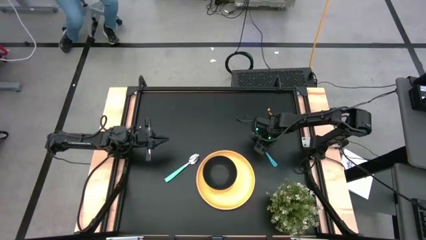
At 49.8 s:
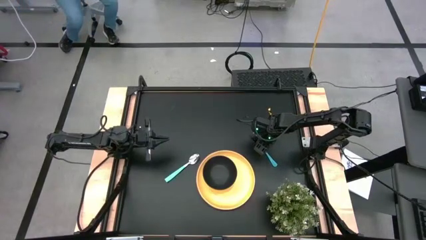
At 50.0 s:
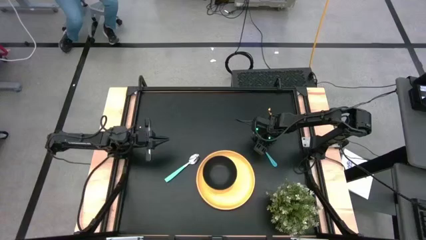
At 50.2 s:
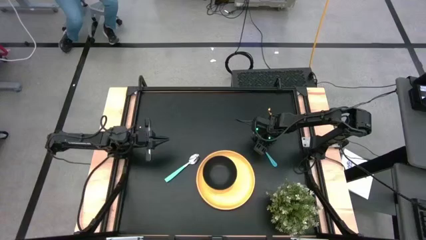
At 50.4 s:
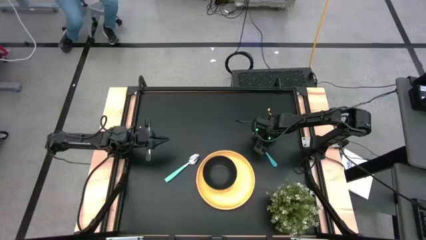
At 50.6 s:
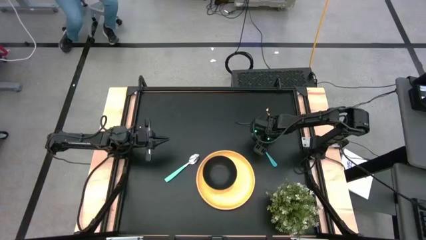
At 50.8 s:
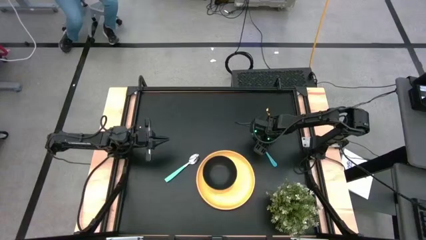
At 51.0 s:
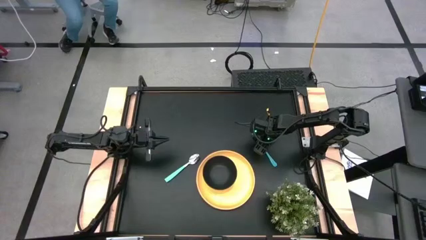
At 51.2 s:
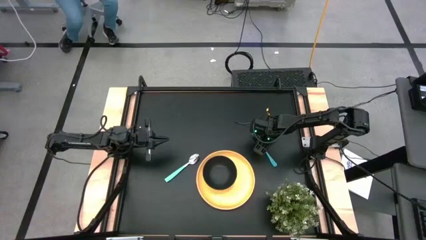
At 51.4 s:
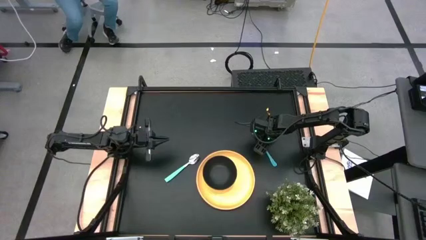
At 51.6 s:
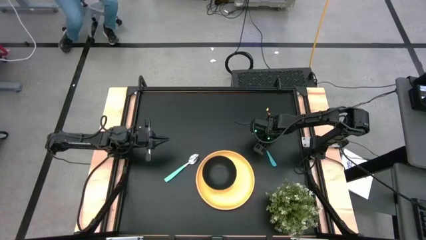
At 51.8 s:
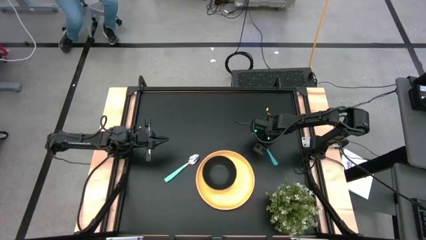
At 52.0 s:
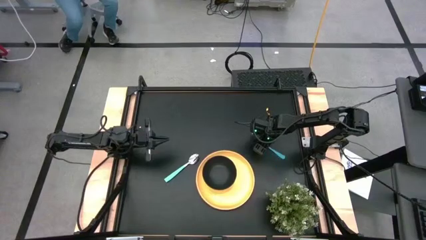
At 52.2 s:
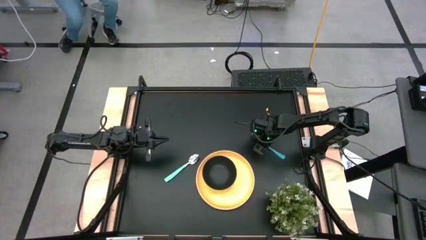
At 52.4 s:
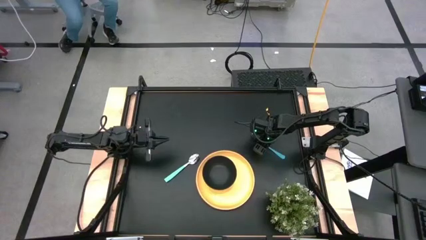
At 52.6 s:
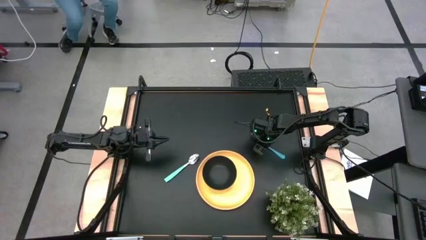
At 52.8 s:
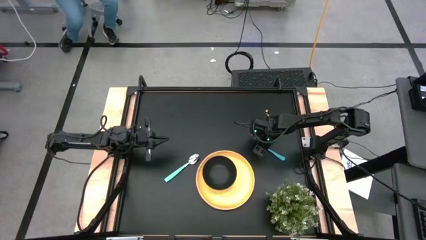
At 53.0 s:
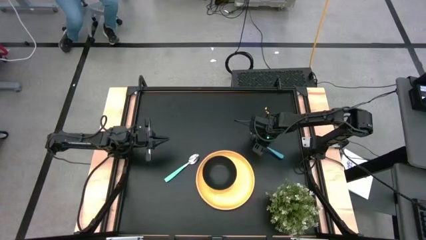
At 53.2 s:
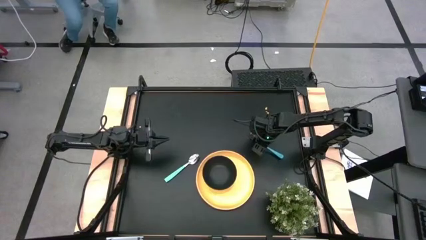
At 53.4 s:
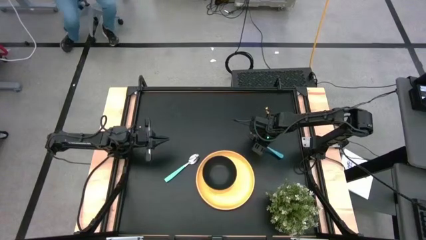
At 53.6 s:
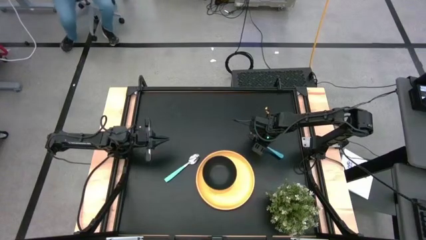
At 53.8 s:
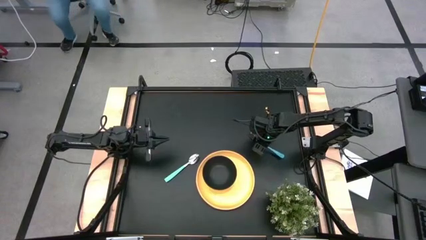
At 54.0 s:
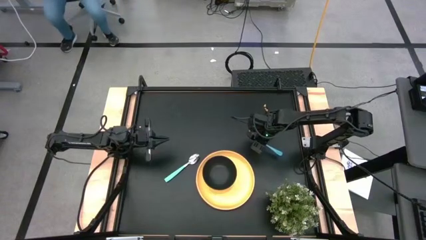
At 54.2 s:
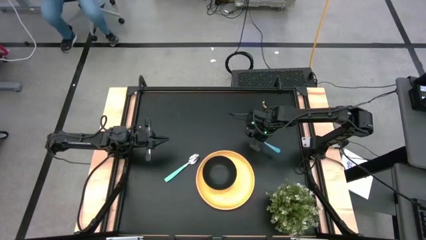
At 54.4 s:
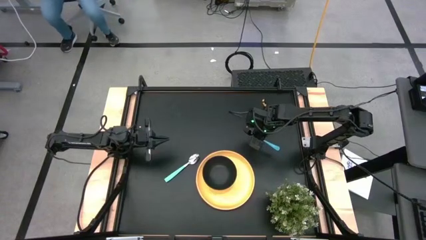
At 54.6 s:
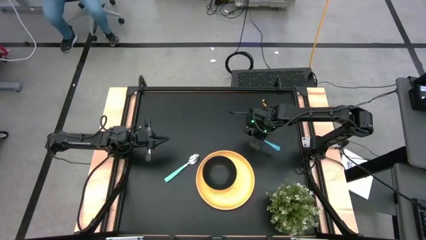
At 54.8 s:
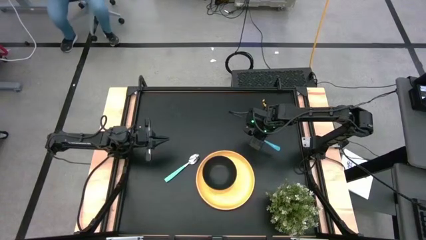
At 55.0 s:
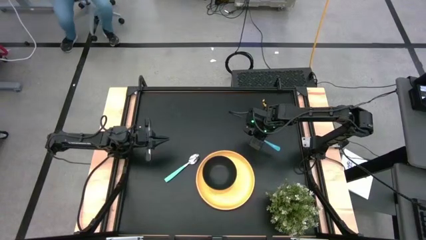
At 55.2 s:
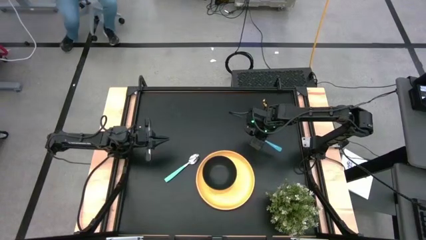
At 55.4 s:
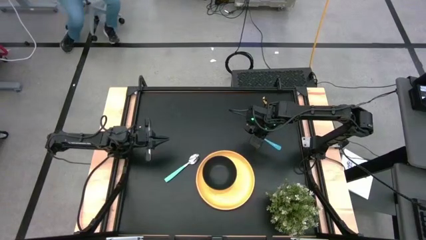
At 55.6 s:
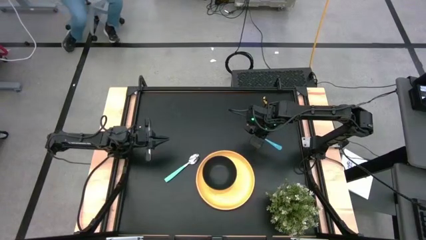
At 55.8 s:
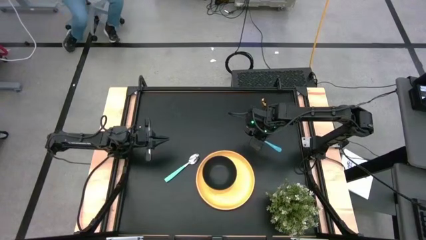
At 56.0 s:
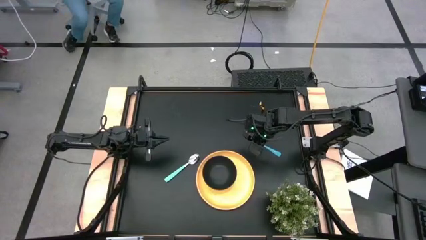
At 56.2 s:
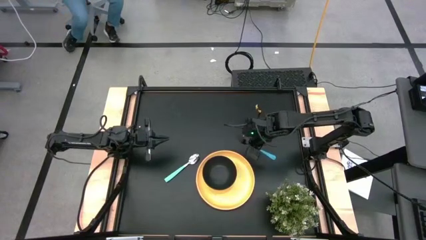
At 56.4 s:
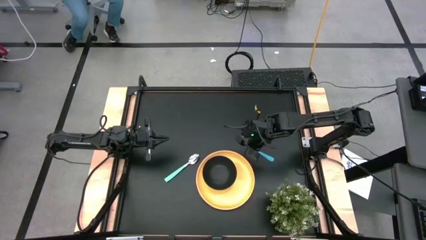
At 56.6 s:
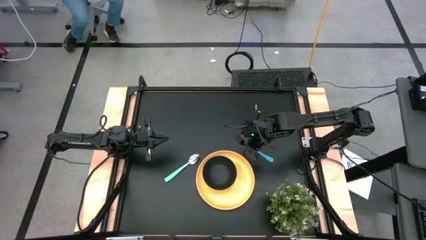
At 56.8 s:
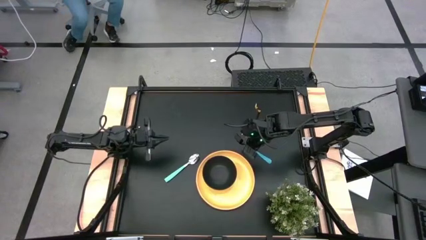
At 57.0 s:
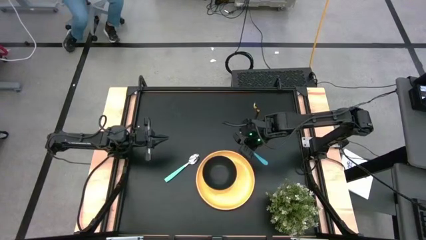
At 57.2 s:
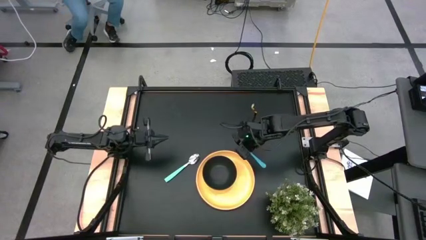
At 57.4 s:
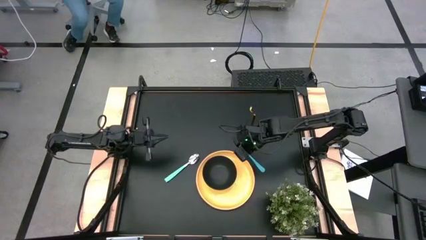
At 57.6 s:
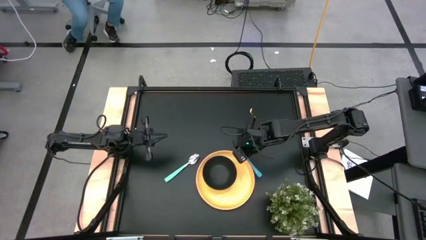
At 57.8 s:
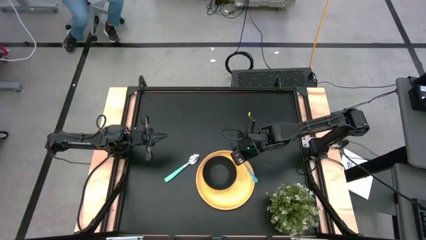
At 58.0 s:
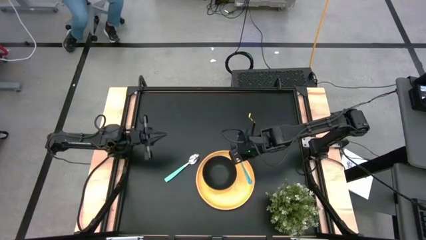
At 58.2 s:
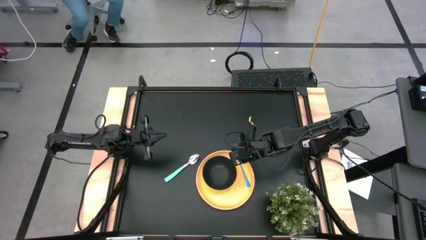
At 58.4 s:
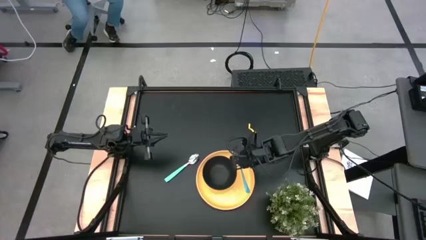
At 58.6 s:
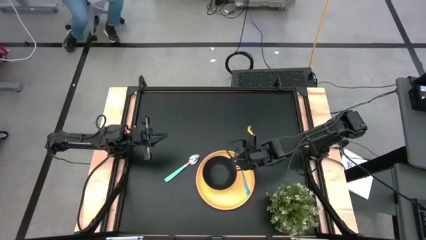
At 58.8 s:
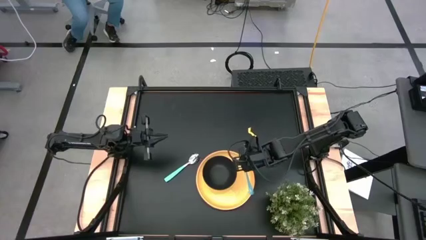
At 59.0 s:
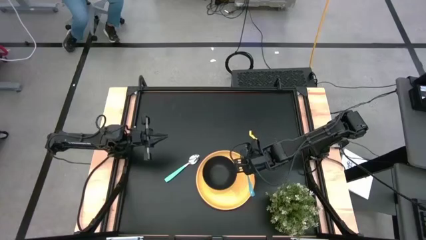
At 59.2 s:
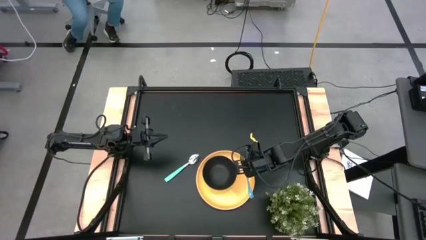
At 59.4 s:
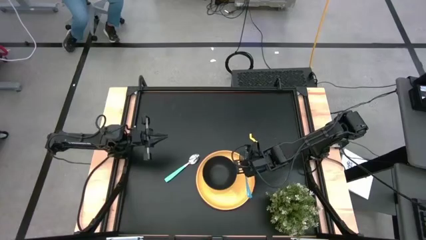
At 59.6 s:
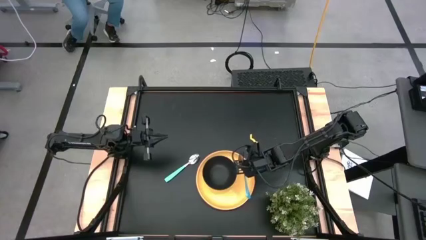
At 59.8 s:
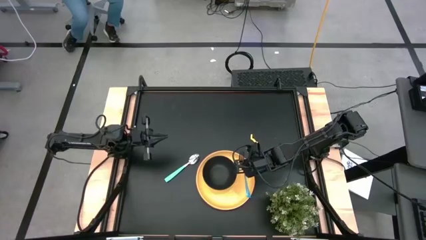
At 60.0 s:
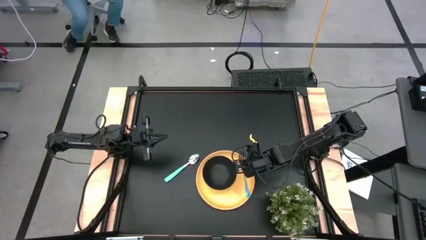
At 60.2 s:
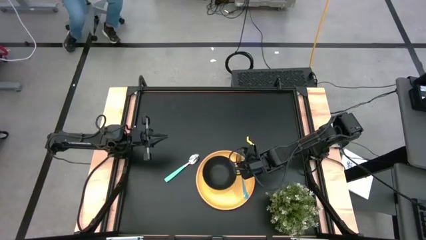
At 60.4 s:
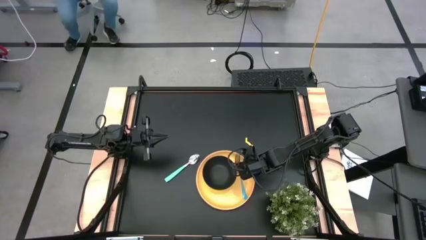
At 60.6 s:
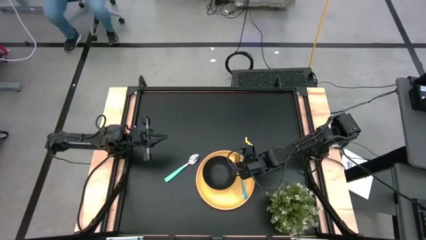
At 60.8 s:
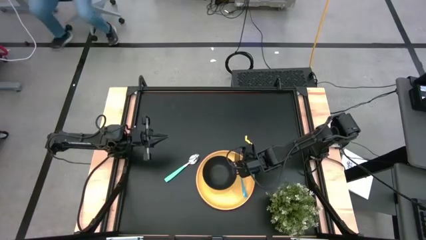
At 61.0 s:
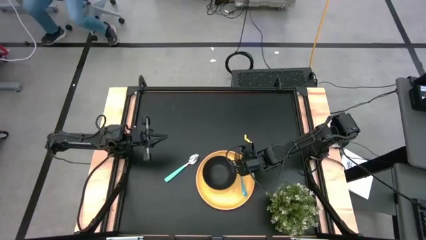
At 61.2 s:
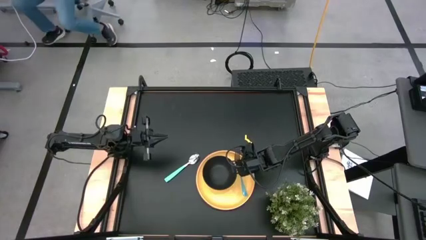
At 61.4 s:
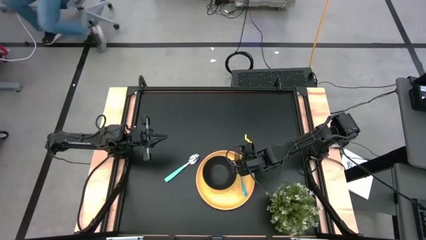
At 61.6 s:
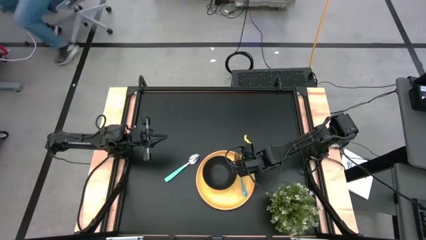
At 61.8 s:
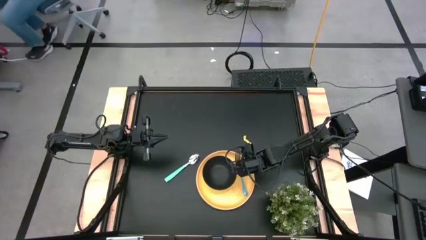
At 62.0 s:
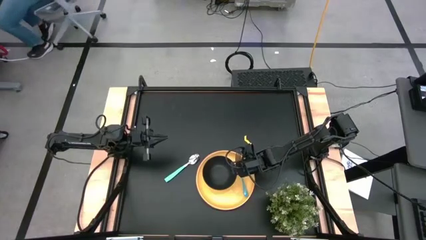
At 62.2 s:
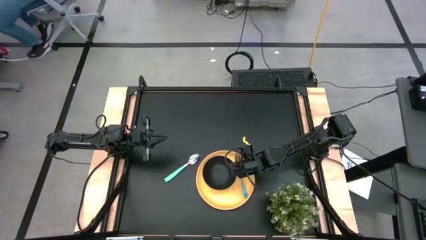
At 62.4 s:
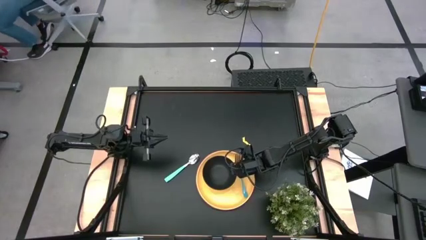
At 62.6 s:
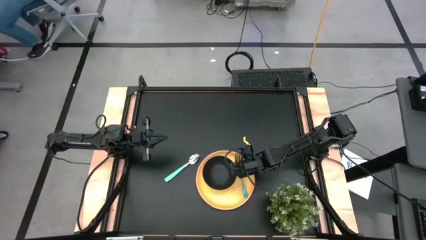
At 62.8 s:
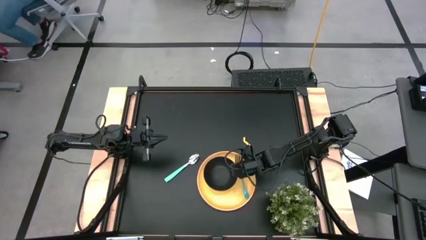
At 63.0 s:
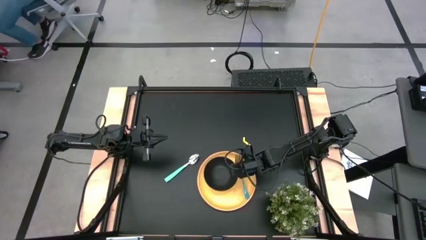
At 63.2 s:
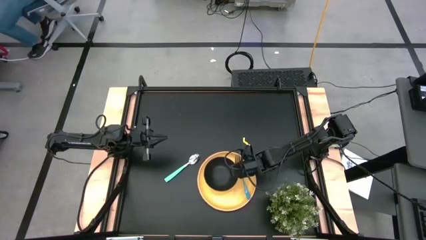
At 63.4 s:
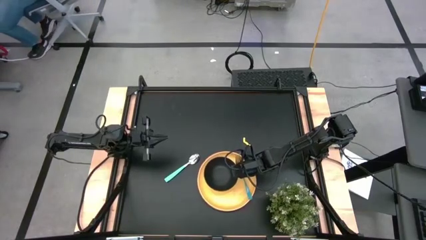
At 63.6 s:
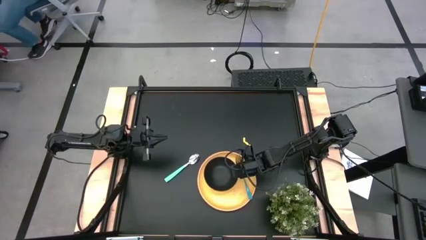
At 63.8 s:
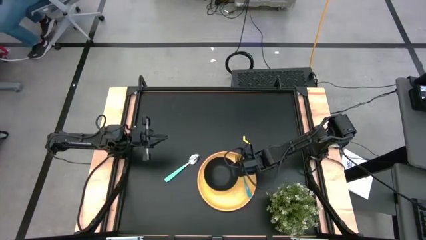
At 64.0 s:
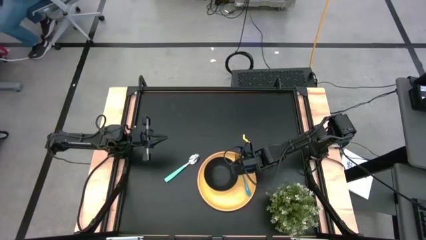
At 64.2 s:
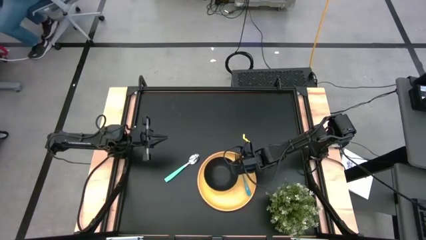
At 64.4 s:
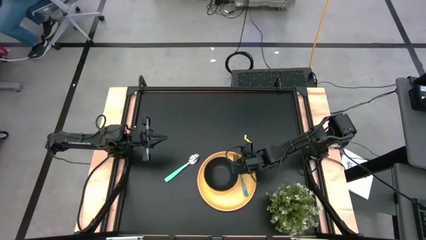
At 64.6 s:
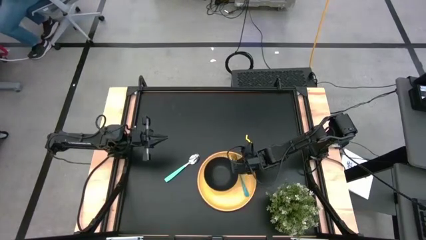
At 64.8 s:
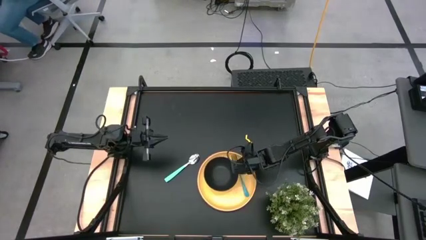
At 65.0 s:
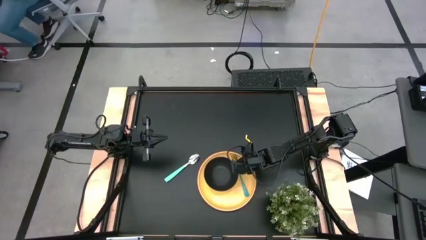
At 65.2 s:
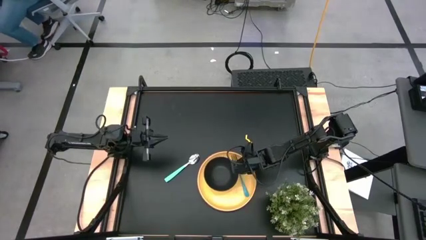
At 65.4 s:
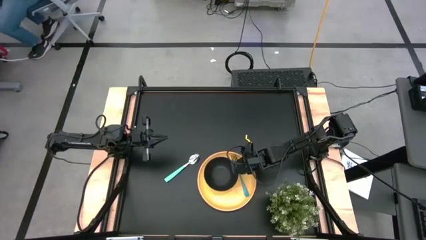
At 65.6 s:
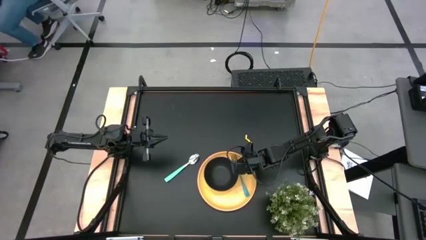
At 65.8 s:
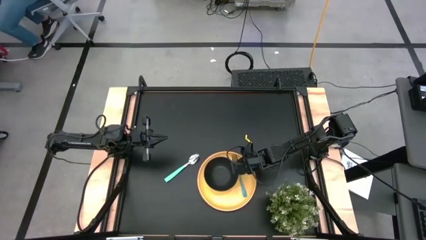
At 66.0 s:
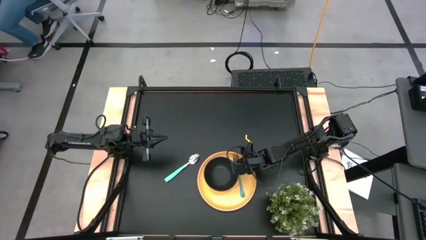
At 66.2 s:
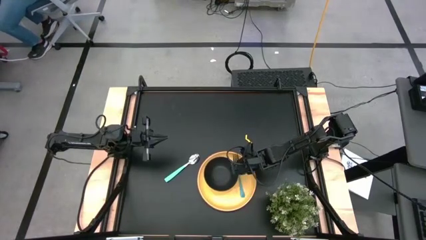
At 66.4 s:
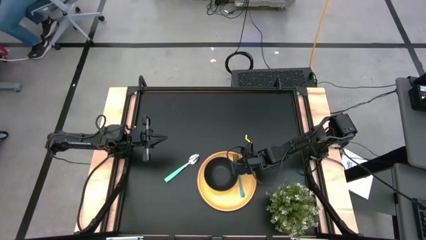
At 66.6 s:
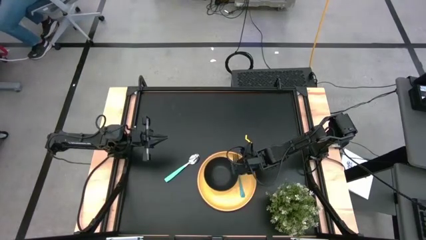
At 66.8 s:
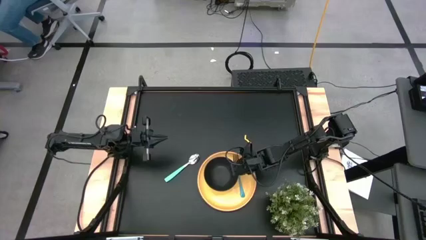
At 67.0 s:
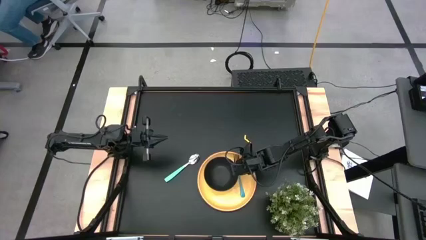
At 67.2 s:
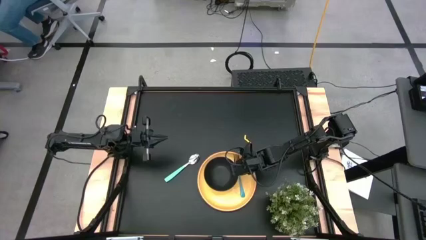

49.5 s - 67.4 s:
Task: Pick and place plate/cup/fork/spoon on tray
Put the blue fork on the yellow plate beside the black bowl
